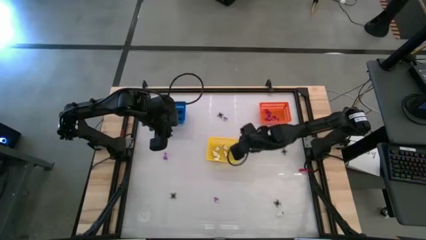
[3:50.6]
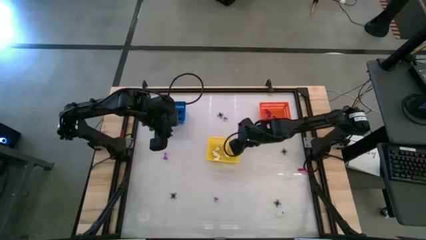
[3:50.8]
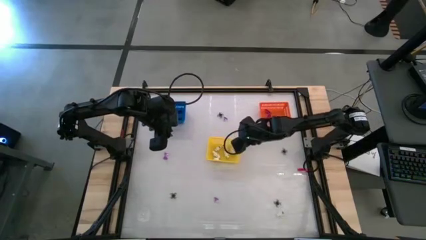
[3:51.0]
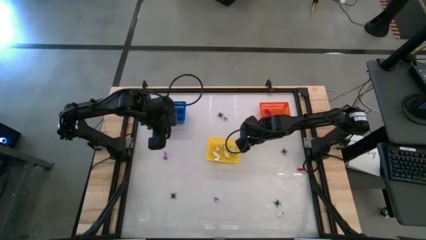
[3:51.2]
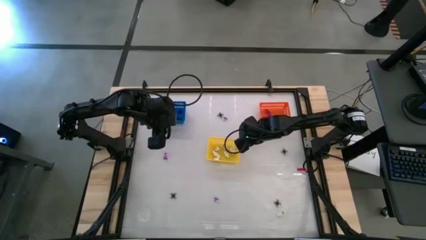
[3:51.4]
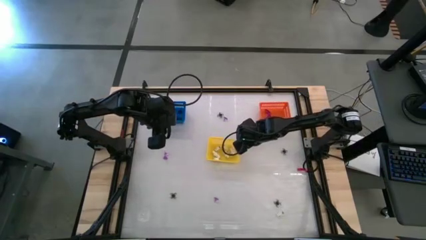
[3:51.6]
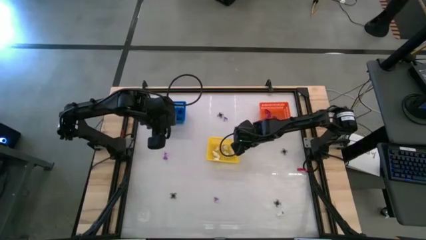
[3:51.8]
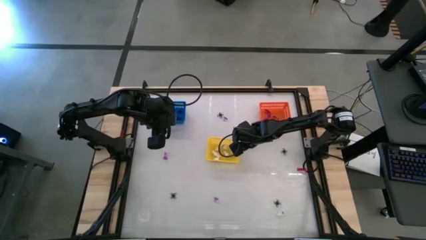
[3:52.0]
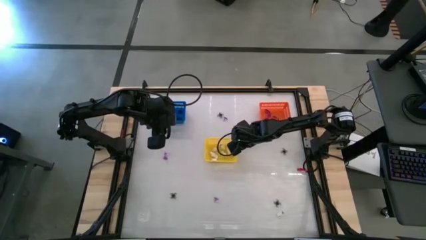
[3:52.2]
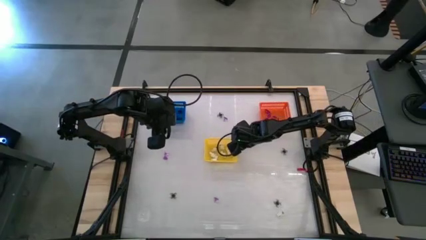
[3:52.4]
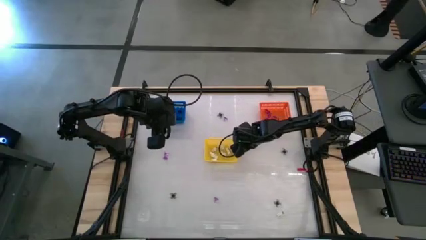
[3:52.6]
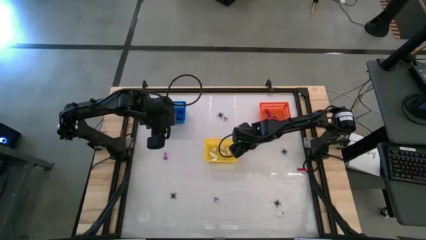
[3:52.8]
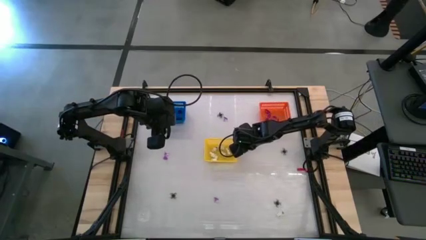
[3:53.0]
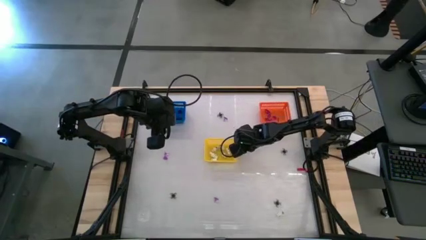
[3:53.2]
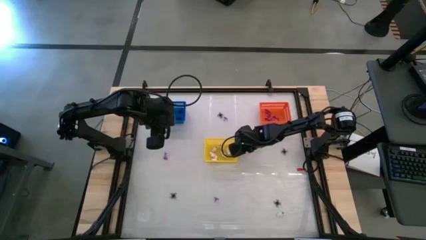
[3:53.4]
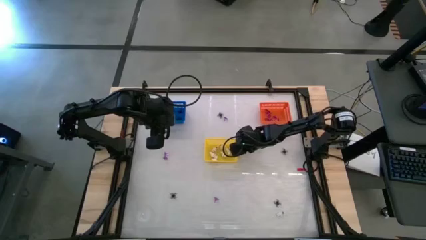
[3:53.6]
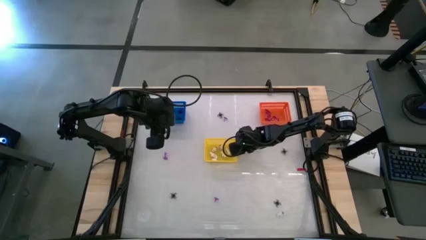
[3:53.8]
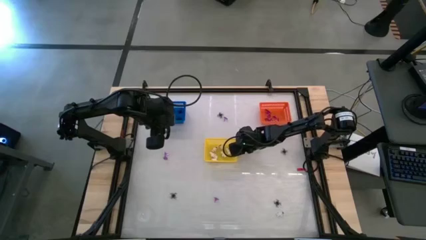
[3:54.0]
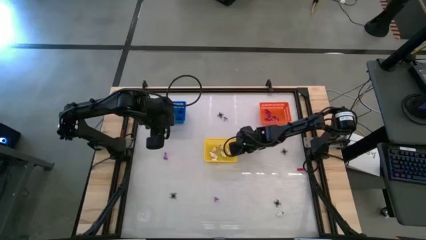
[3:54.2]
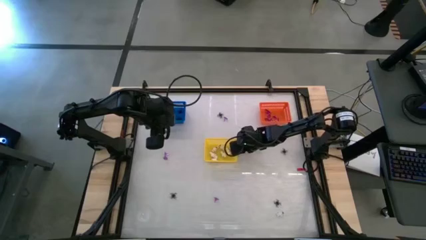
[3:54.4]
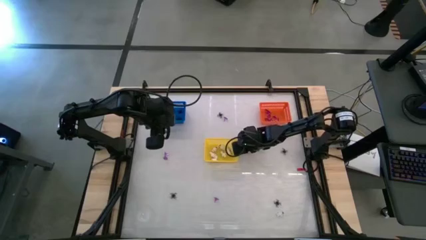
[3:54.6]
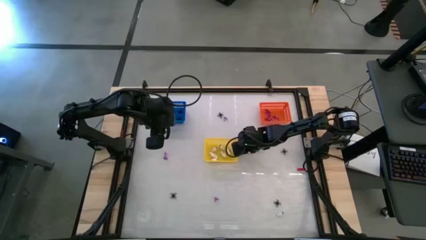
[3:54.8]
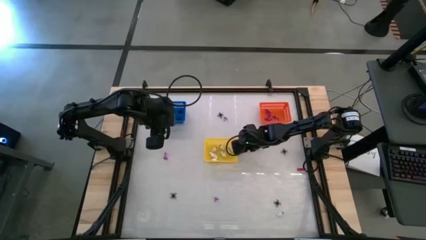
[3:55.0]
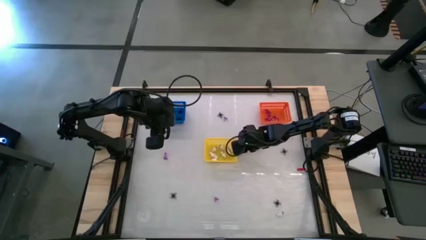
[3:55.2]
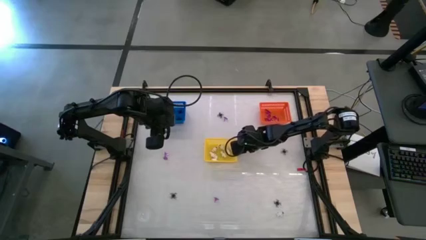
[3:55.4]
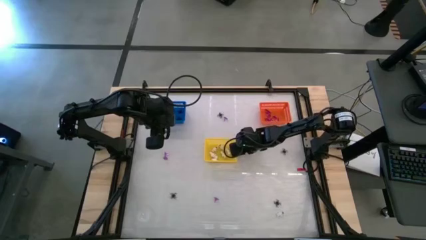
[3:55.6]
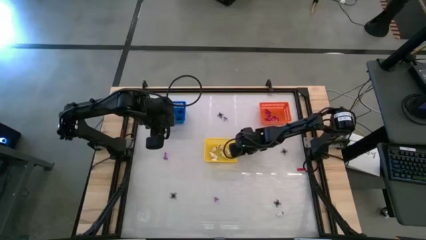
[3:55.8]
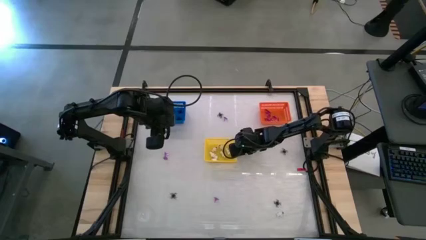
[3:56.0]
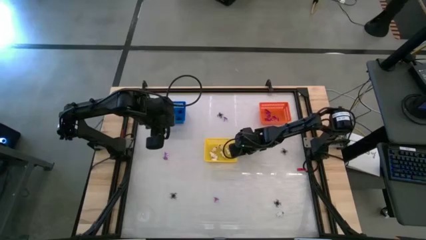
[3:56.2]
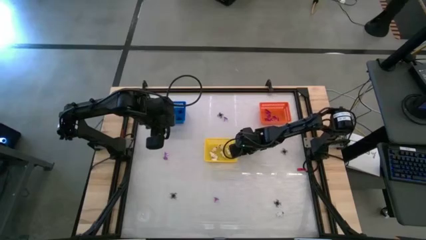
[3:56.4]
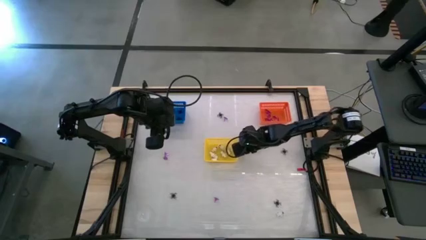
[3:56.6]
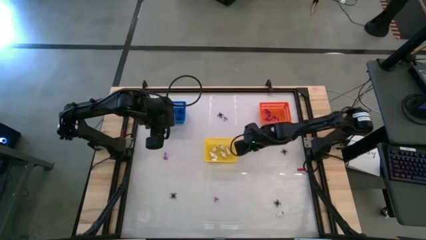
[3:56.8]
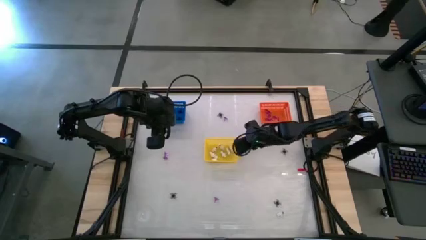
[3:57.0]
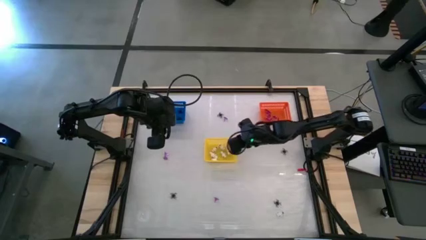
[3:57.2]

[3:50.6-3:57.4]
Task: Sort Halloween decoration
Put the white skeleton toy into the yellow bin

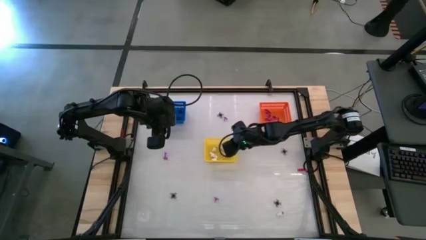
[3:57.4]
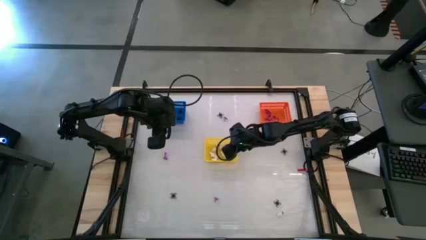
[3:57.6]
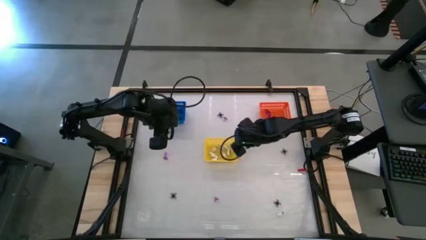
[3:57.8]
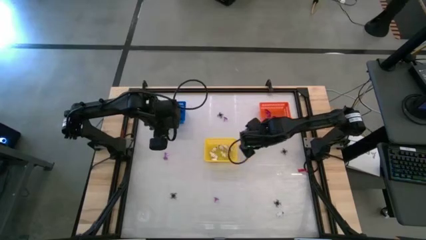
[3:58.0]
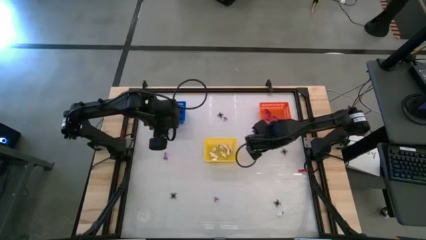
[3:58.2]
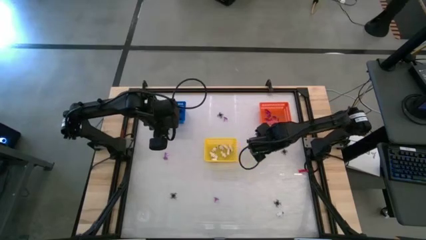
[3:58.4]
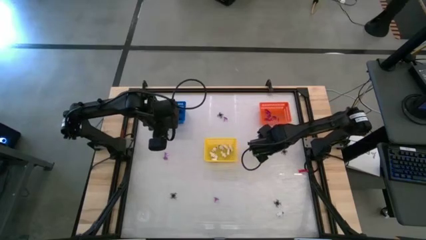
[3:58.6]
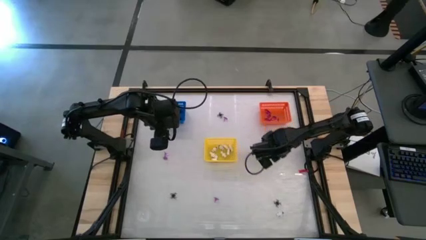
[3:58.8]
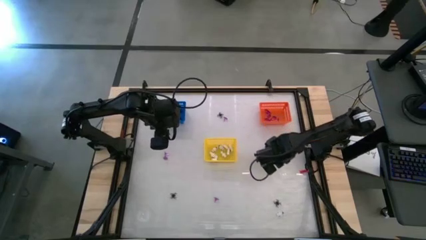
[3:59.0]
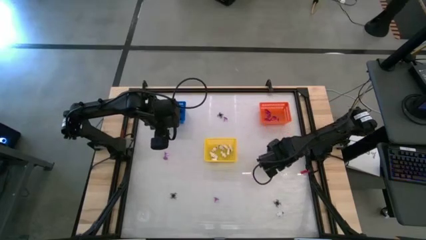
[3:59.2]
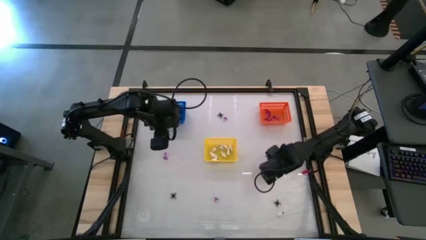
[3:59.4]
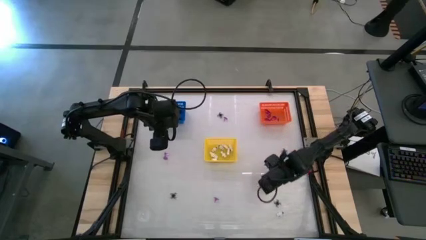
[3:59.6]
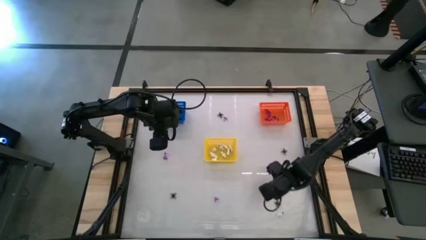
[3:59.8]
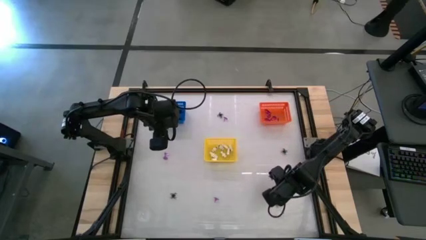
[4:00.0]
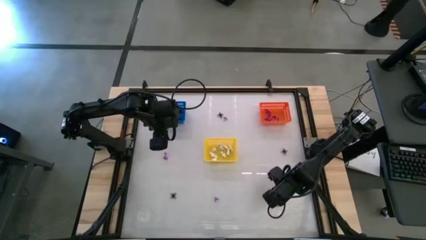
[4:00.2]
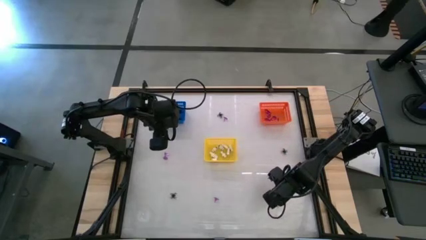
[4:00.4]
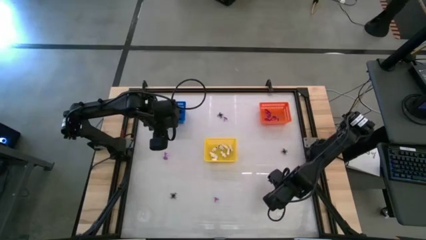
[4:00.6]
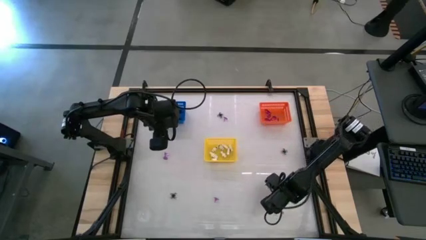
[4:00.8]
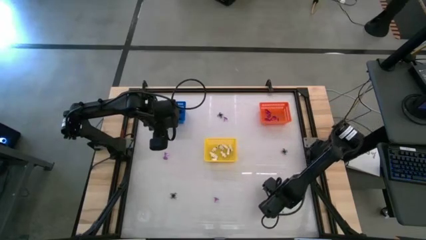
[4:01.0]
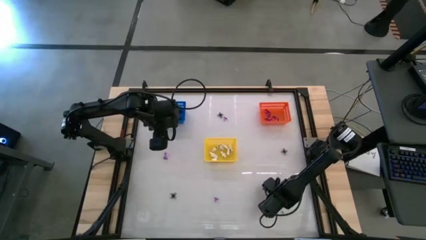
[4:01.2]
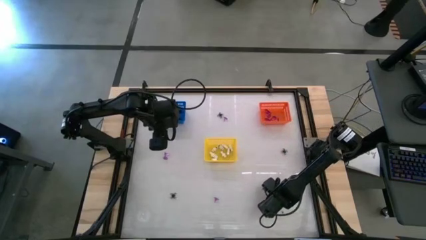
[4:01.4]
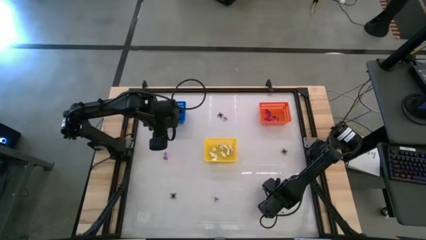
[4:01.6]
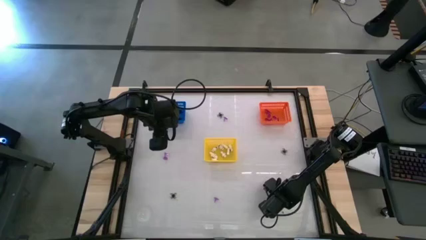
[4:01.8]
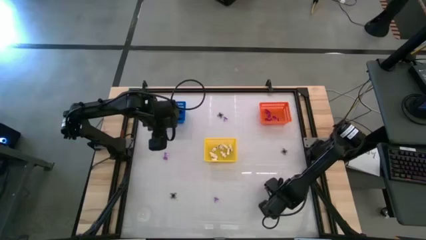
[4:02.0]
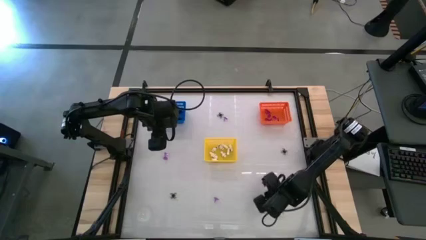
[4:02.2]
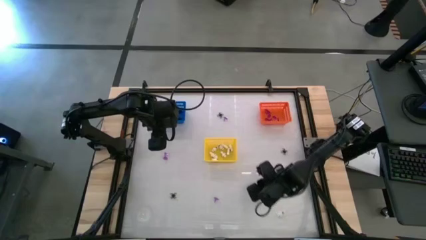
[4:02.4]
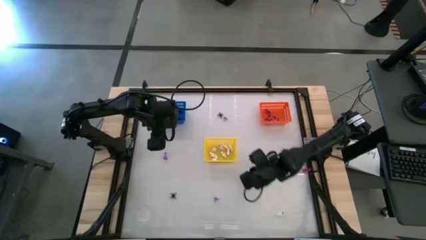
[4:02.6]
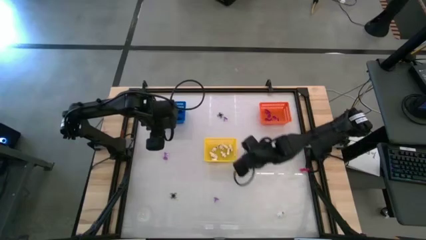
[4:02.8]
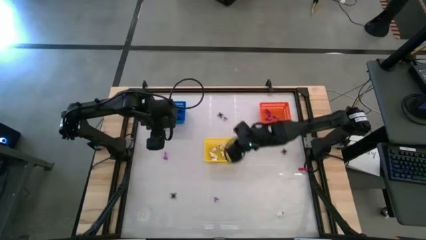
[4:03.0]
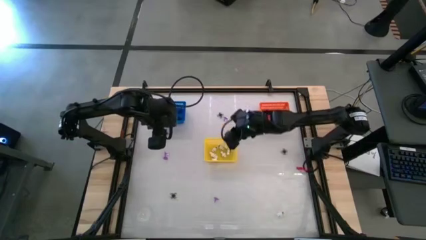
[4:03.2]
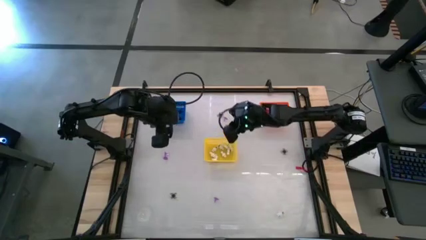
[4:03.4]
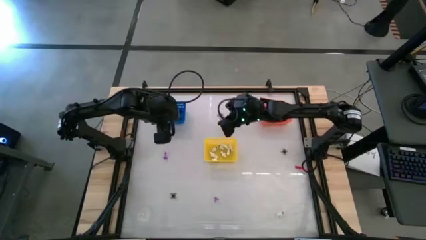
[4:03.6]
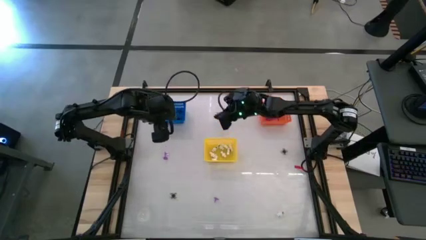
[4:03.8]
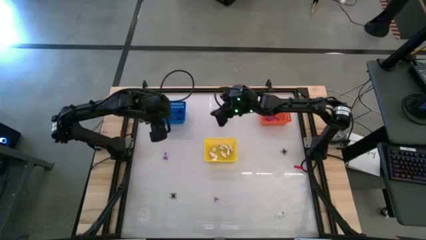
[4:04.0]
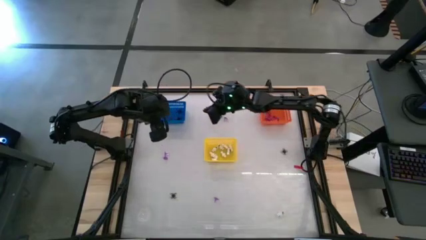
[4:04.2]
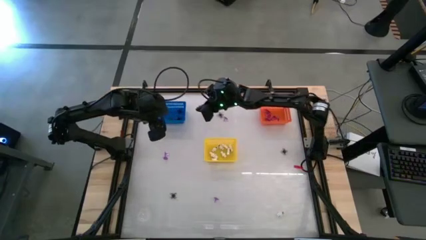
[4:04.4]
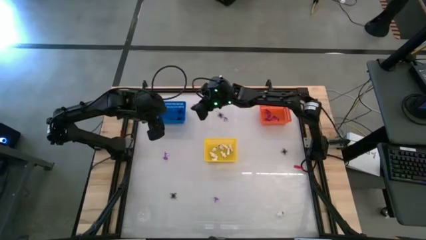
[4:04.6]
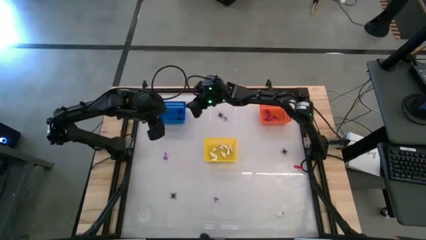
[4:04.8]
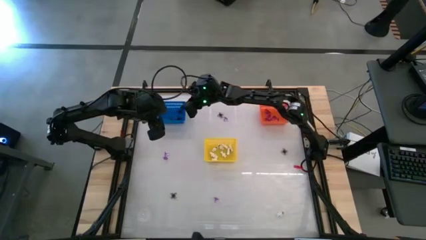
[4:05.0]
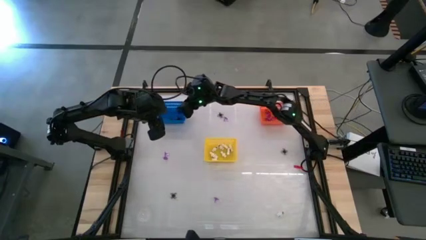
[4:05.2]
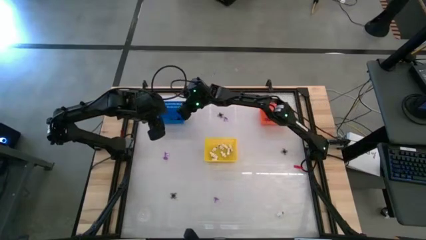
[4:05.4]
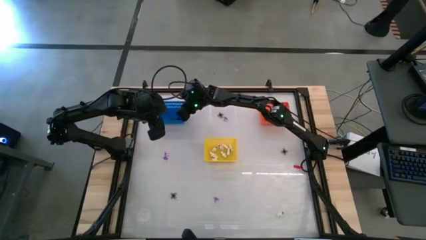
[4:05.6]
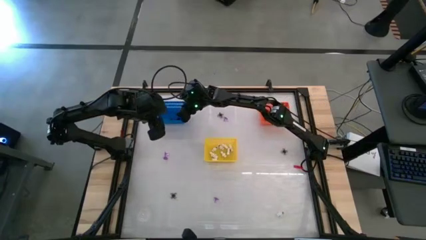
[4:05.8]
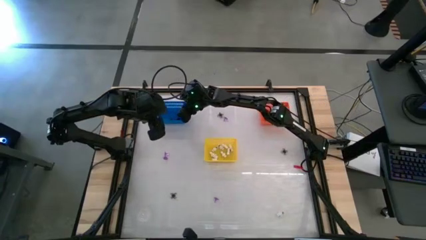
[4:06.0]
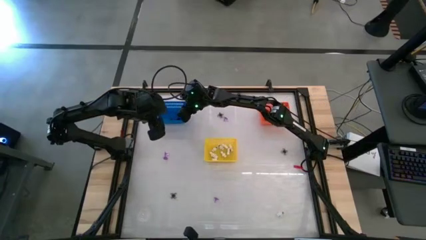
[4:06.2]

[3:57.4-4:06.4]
Put the black spider toy into the blue bin
